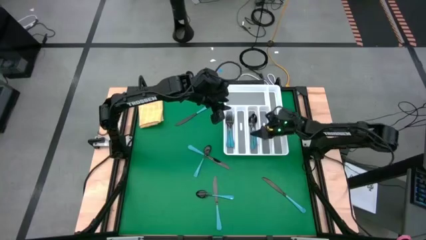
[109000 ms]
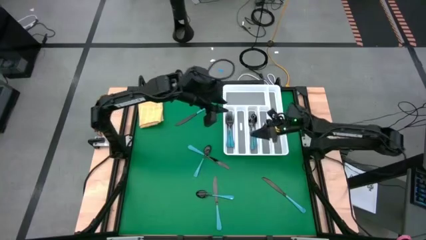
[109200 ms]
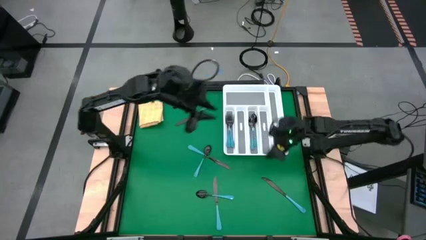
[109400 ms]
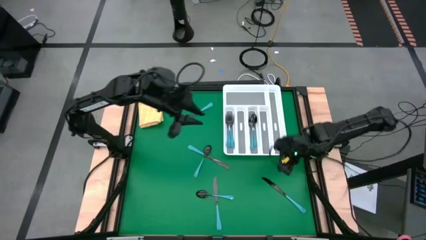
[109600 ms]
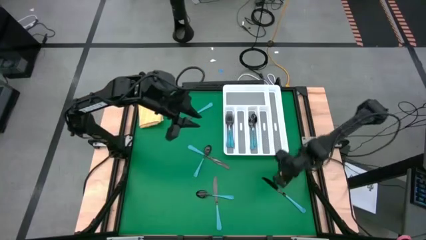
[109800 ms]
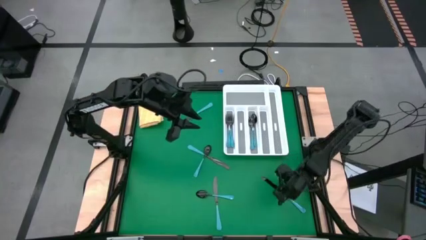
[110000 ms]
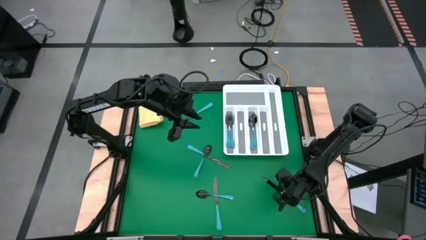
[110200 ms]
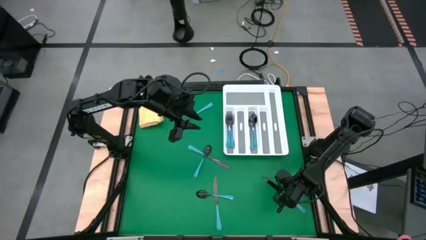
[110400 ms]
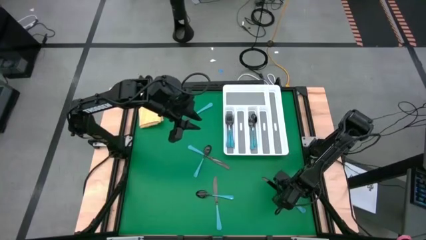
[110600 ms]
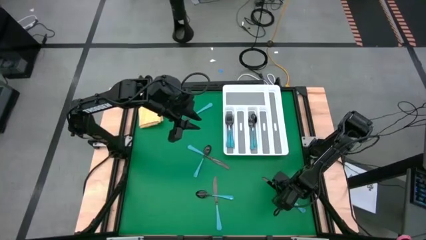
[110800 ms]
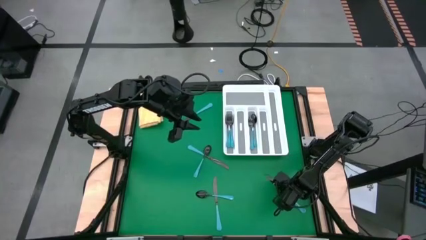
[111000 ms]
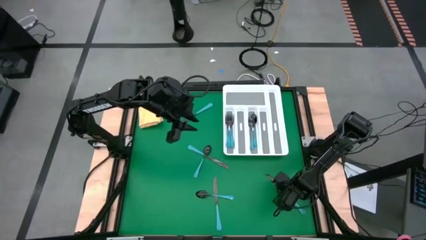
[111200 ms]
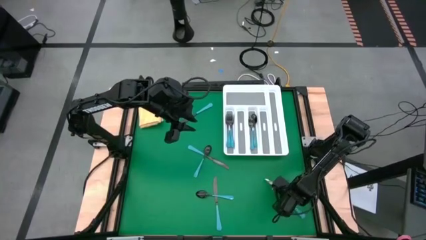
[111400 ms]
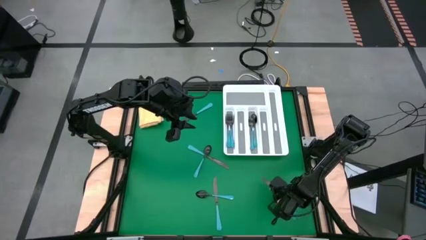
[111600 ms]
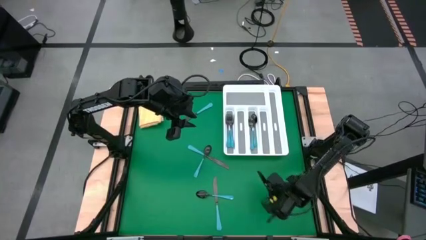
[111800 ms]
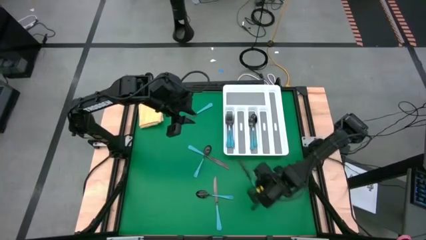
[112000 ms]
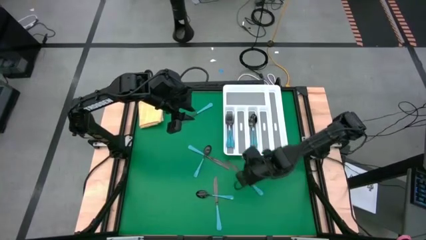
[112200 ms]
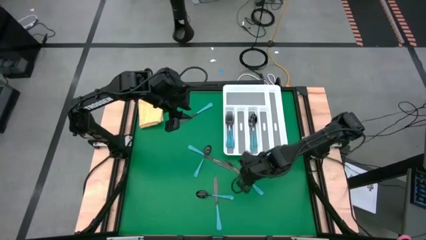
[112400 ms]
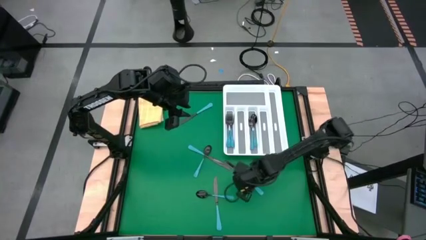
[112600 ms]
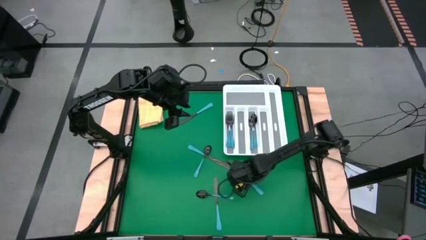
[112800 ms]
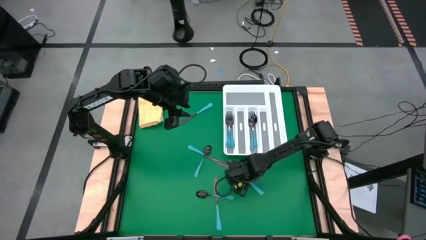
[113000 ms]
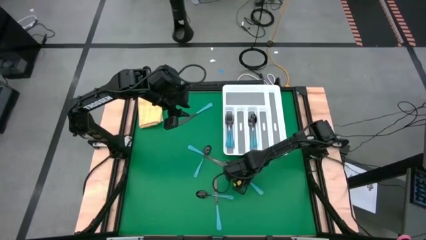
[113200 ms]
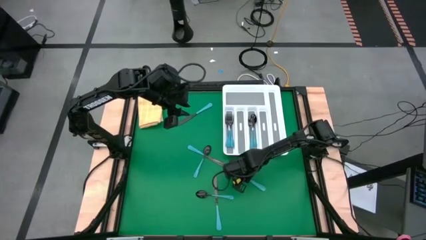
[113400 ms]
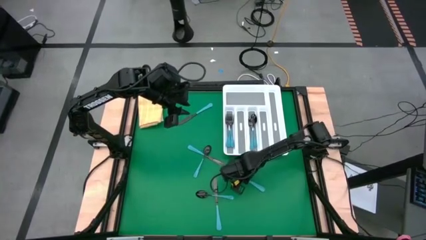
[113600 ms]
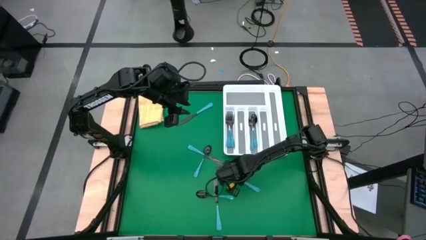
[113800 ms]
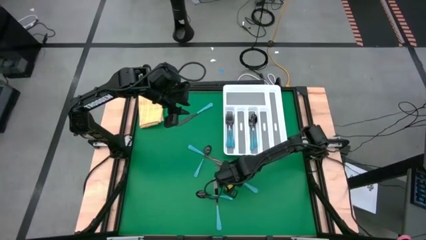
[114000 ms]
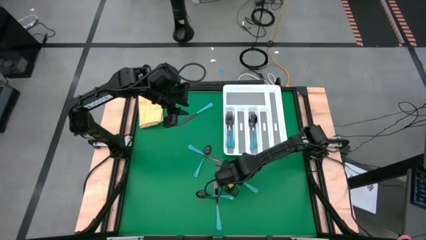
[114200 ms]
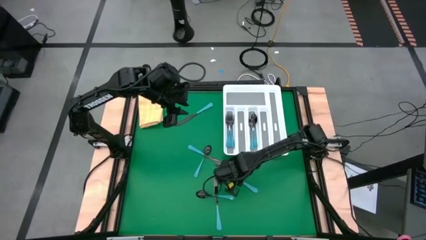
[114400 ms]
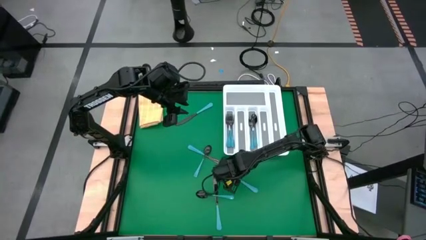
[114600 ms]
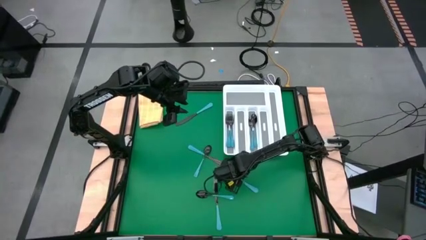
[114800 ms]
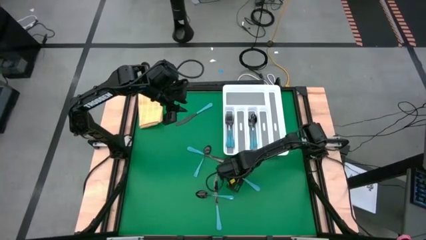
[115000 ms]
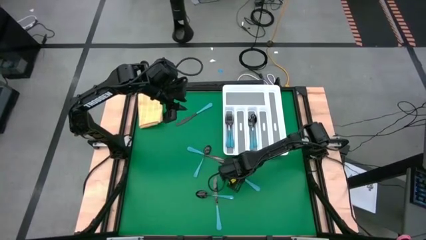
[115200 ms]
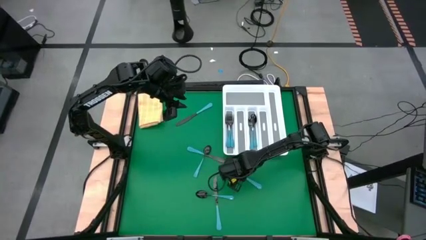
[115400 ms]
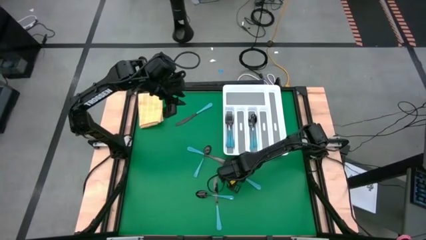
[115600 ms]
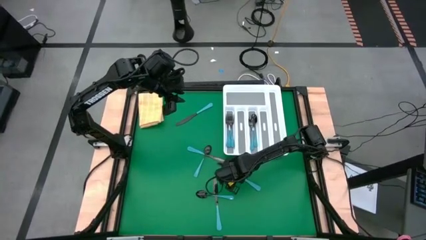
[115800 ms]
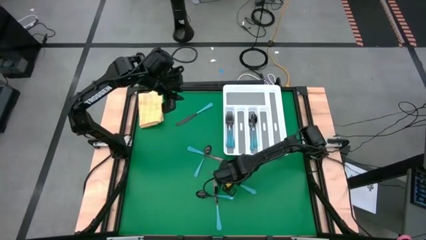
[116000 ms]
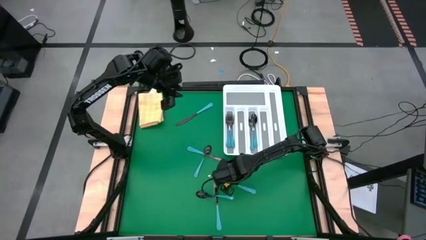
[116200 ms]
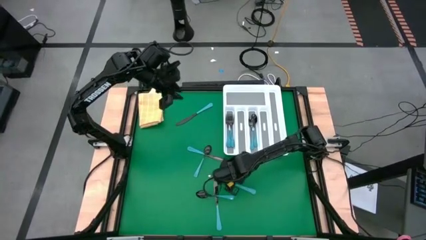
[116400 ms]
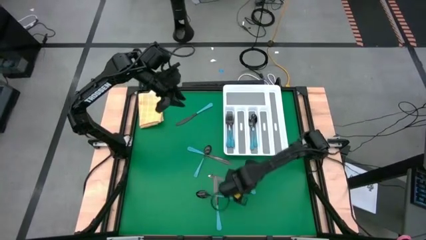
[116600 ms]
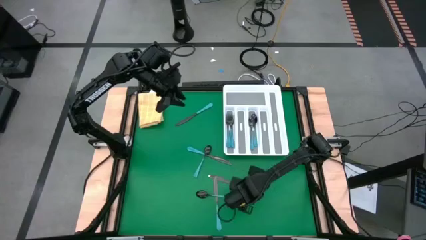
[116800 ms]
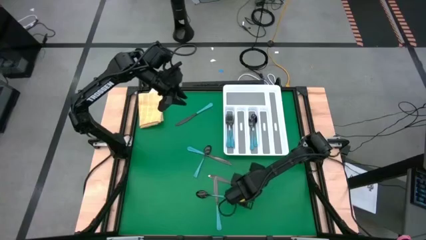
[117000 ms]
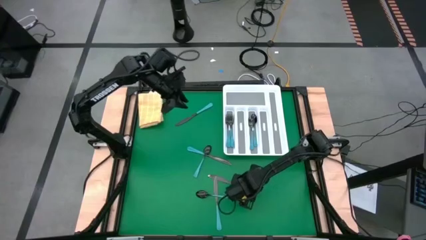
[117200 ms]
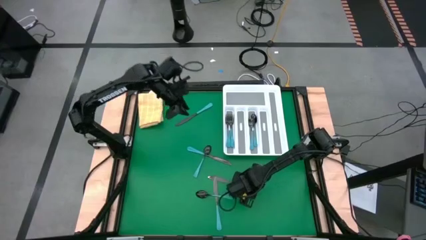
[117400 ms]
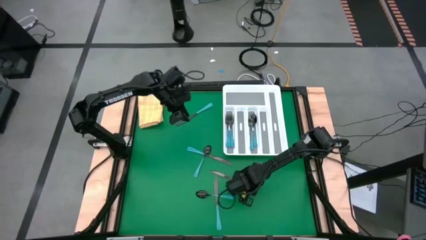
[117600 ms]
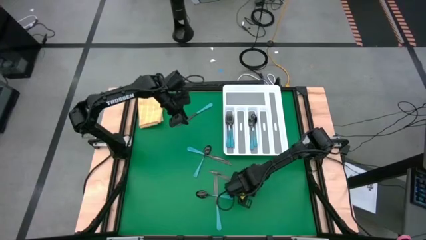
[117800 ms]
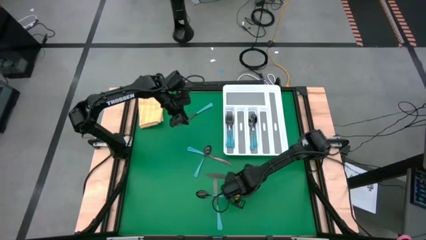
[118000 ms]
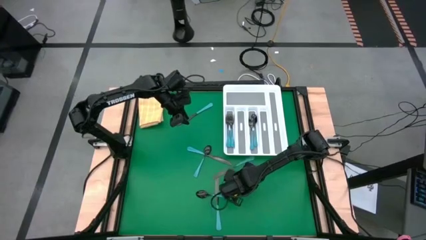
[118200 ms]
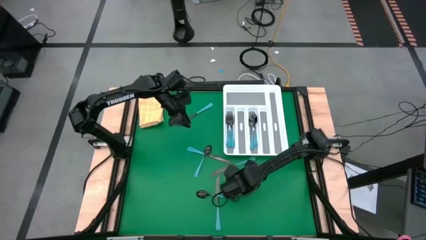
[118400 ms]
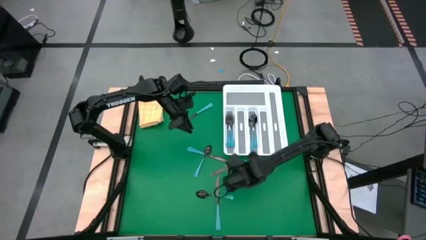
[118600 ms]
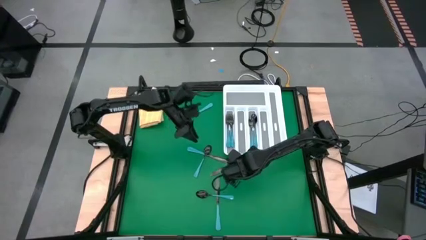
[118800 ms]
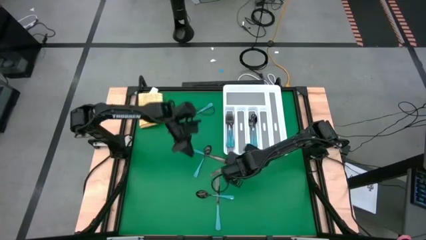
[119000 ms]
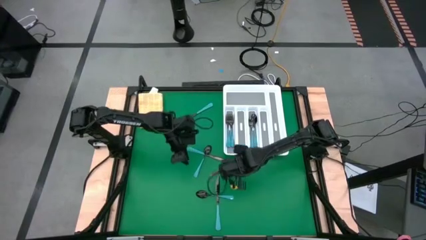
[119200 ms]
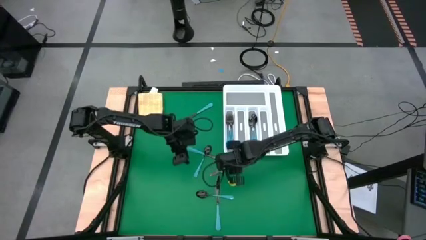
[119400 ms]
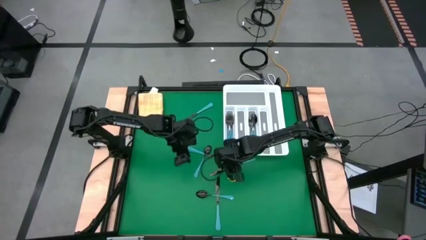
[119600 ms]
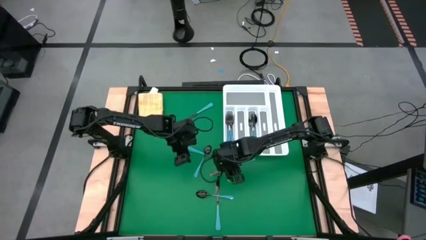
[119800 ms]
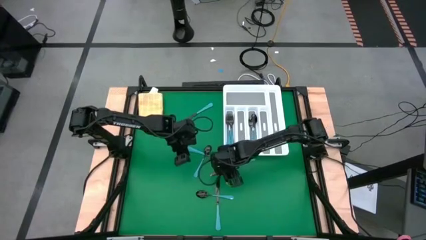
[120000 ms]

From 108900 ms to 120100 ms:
Task: Sort silverware
Put the blue table knife into the silverware organizer

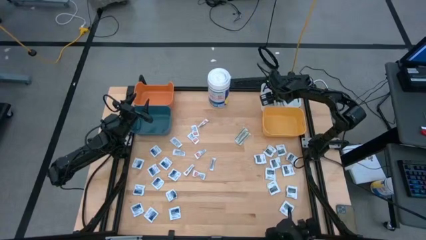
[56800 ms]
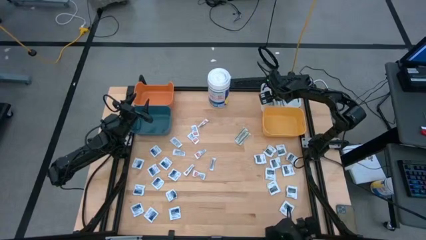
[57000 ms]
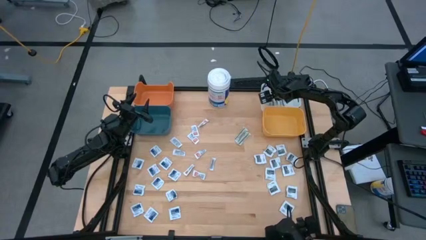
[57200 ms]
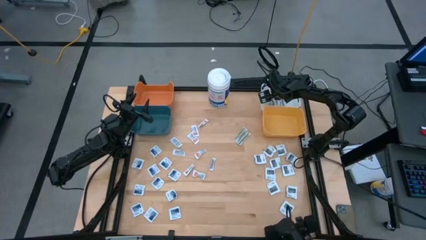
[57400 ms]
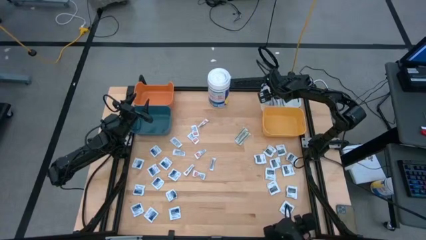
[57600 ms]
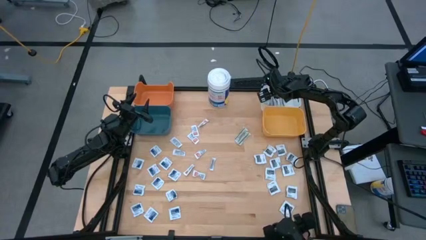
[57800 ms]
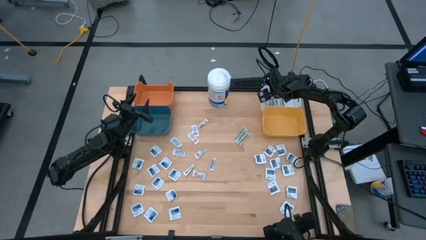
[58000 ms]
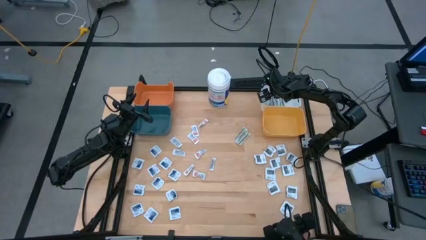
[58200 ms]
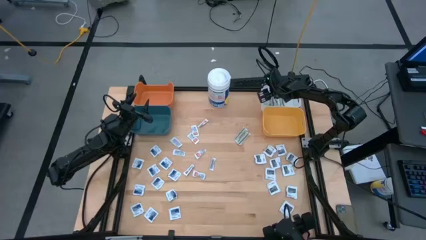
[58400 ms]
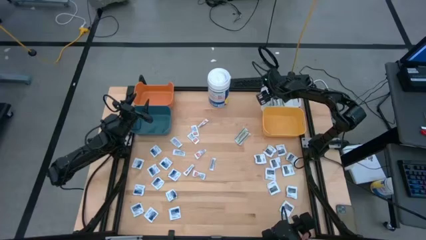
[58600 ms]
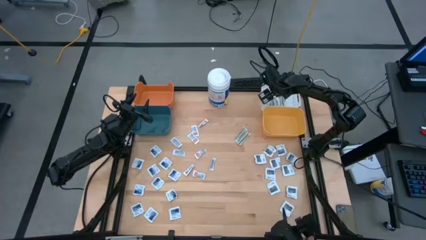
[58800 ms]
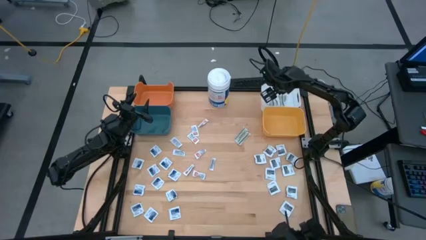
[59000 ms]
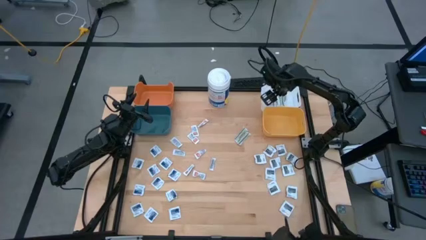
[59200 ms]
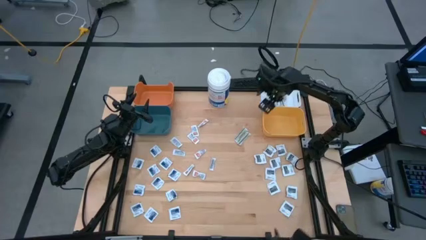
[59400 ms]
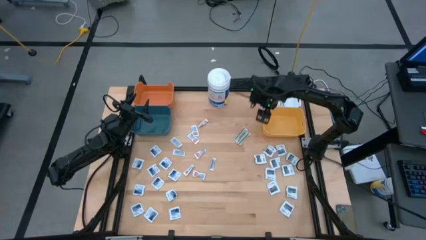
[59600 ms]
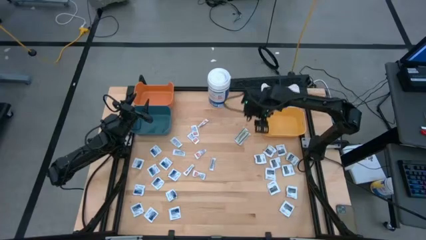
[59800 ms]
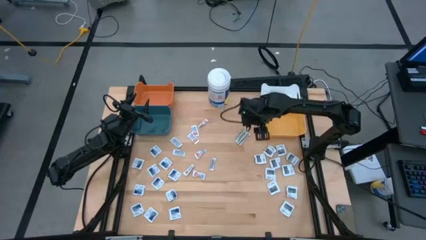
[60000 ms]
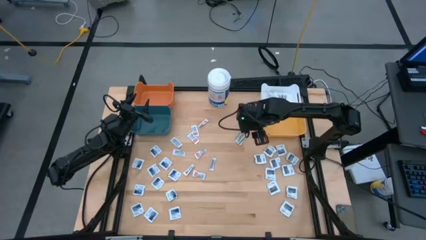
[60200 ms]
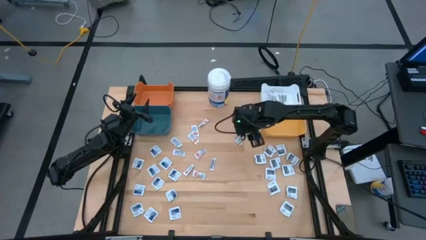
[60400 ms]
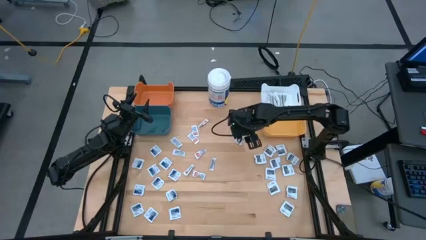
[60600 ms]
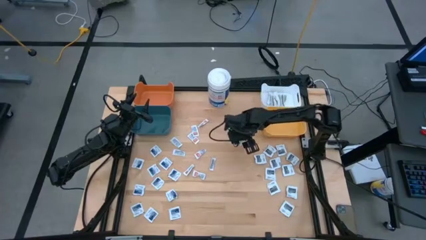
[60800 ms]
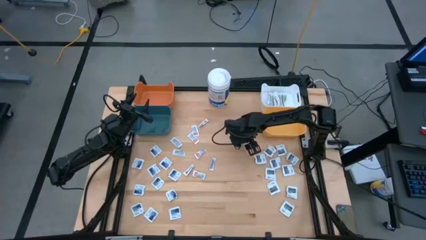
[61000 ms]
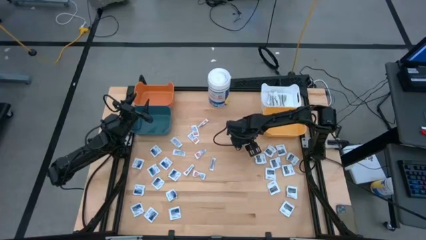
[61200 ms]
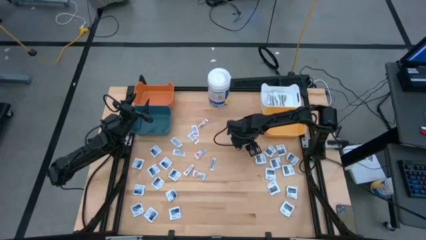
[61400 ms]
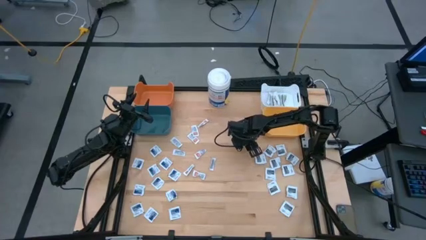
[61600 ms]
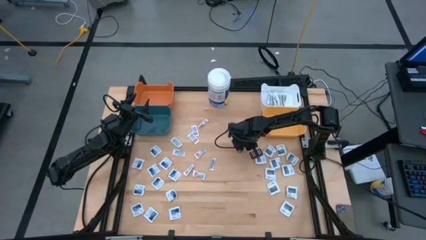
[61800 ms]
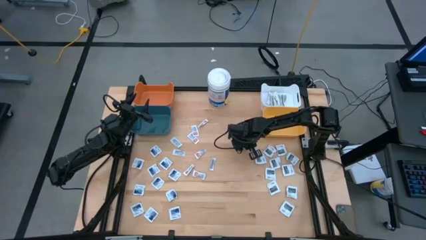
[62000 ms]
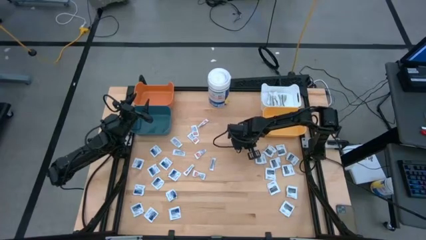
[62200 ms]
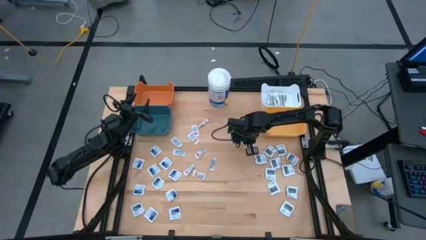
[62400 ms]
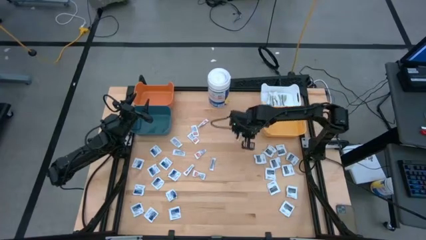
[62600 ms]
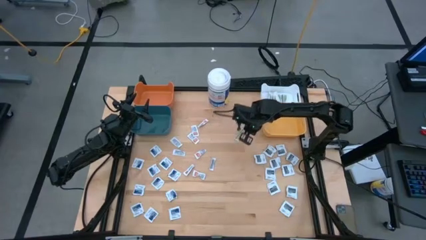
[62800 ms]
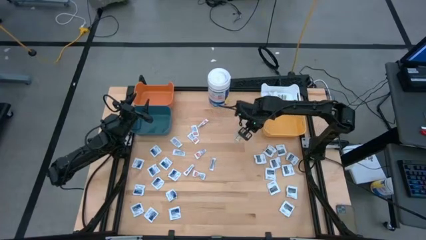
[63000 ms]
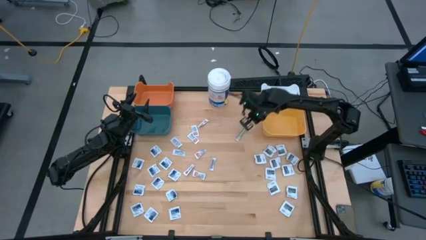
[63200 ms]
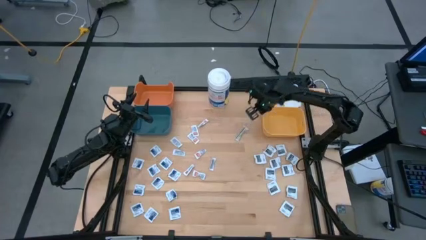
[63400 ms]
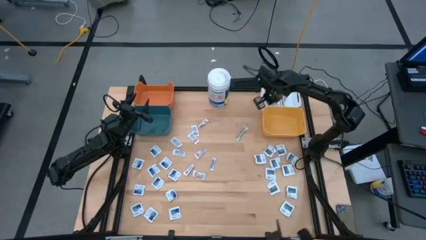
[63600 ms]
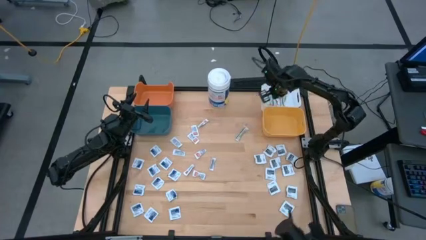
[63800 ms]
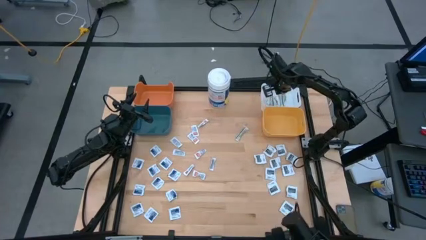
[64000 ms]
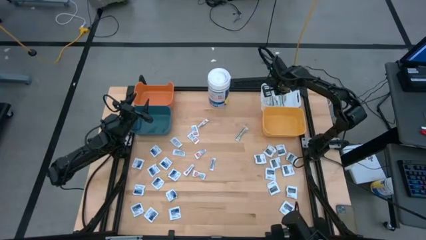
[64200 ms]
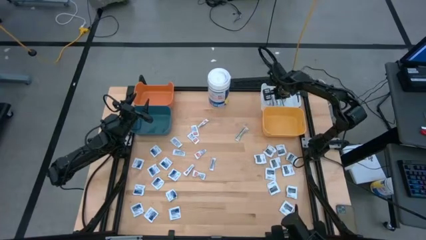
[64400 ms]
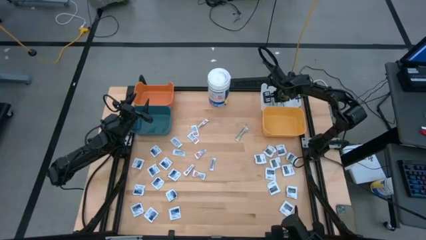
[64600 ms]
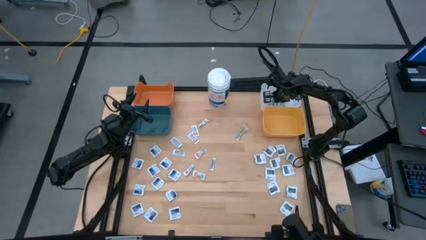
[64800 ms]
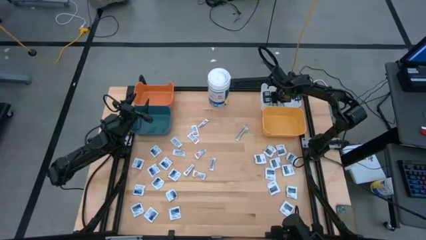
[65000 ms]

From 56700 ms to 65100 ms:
Task: Pick & Place First Aid Supplies
Put the green bandage into the white bin
